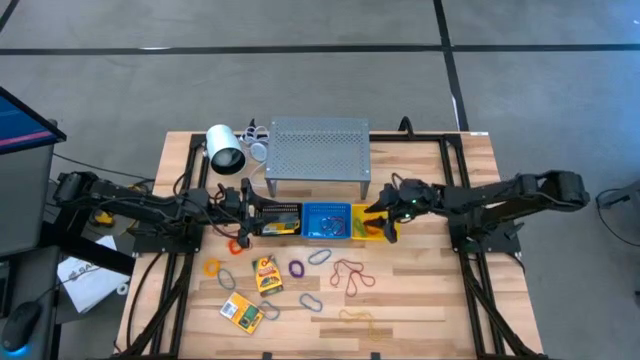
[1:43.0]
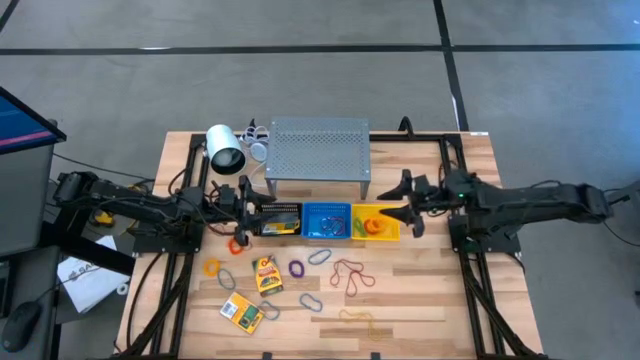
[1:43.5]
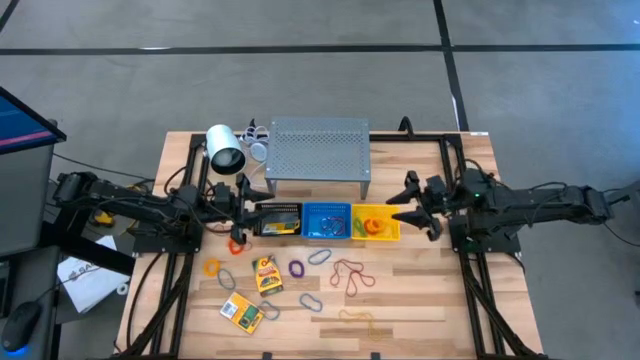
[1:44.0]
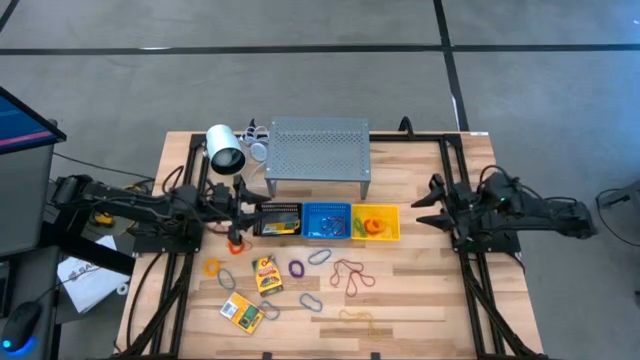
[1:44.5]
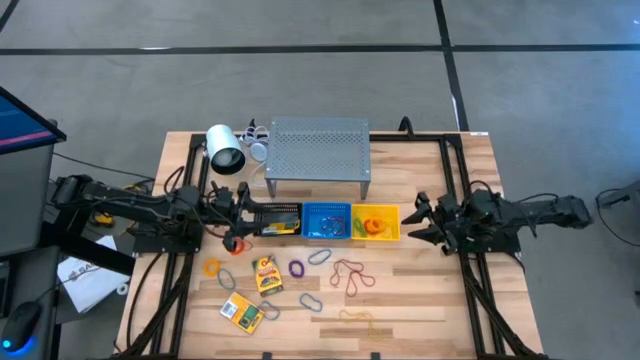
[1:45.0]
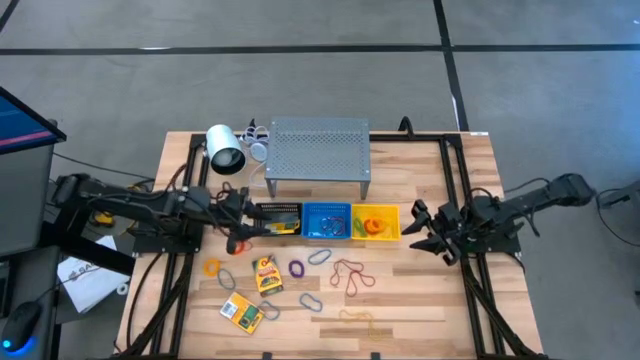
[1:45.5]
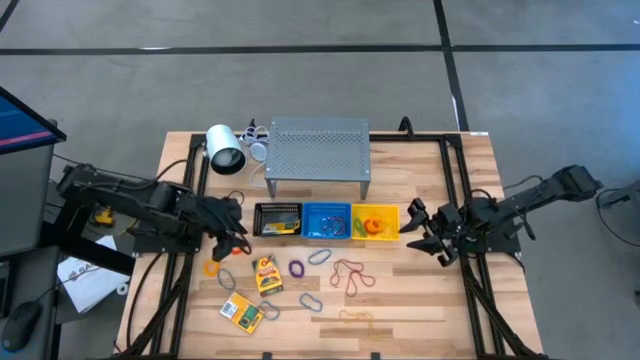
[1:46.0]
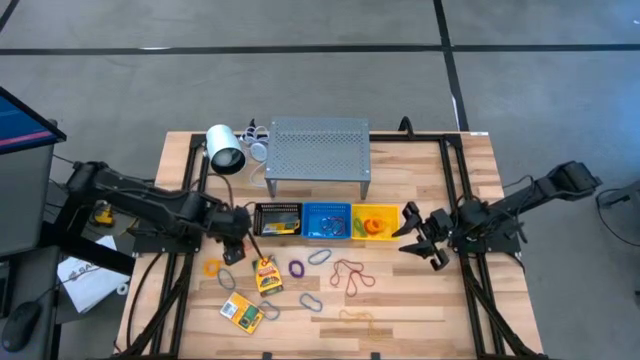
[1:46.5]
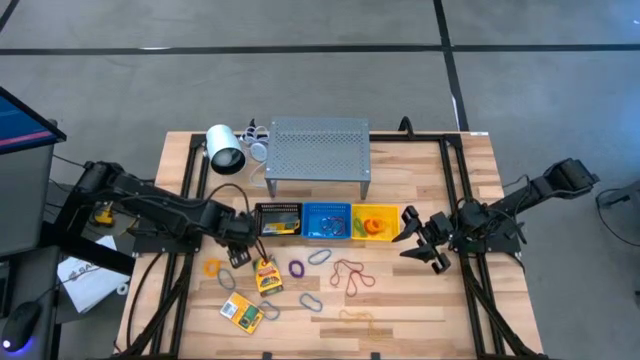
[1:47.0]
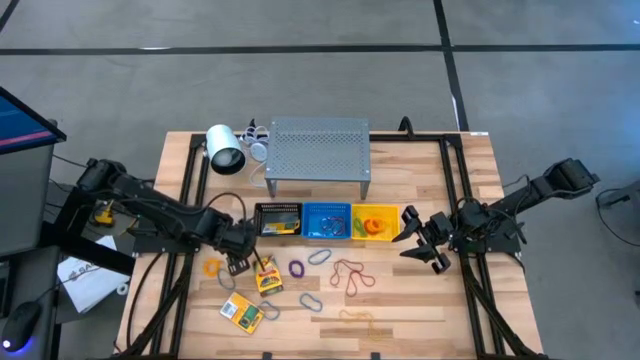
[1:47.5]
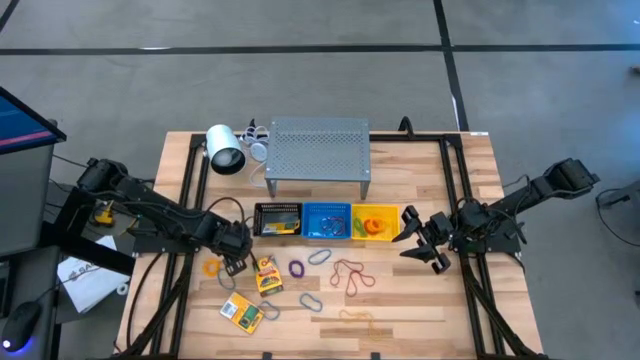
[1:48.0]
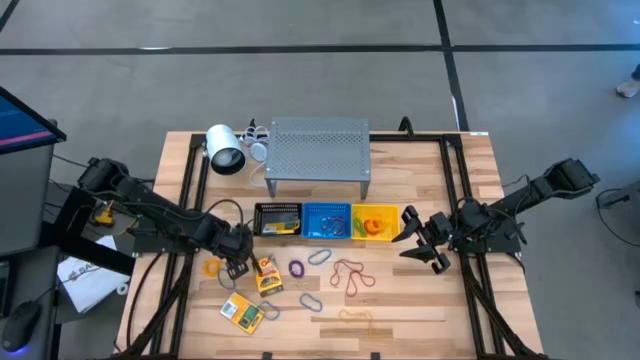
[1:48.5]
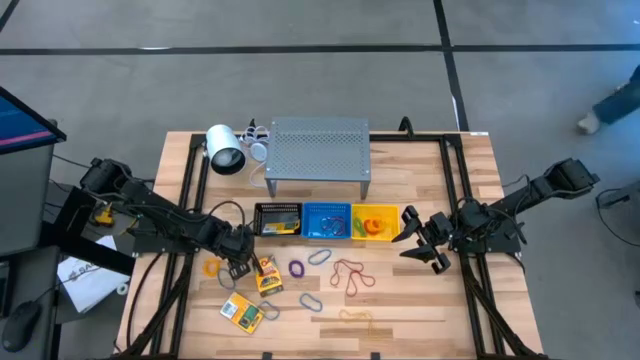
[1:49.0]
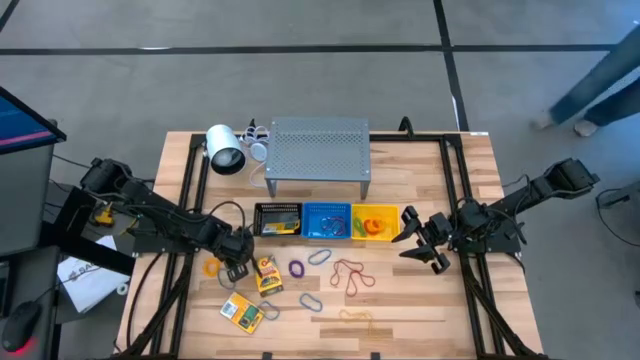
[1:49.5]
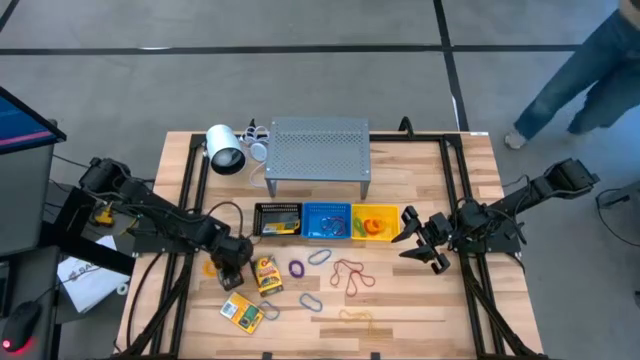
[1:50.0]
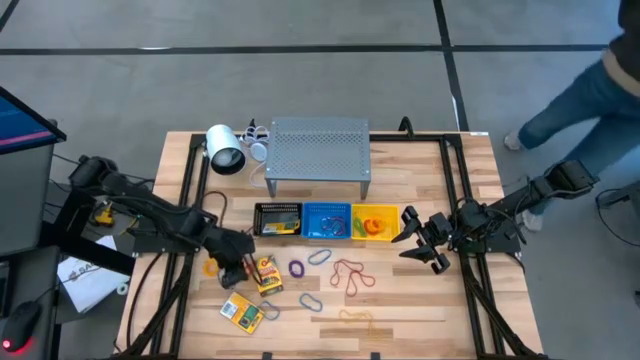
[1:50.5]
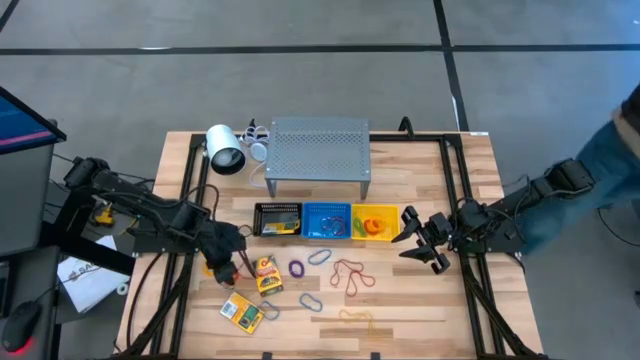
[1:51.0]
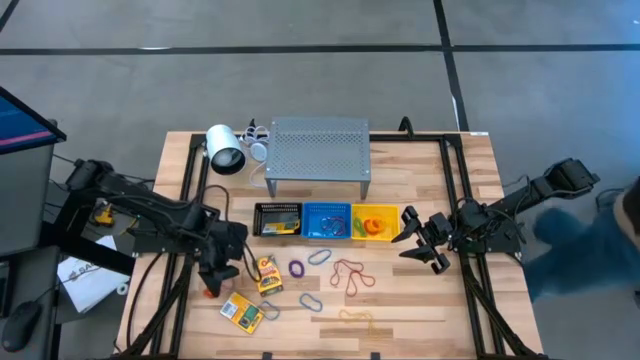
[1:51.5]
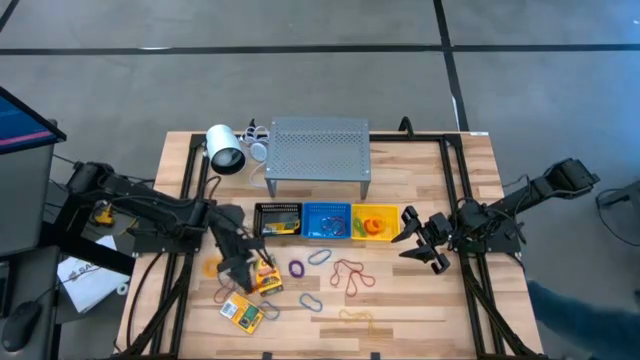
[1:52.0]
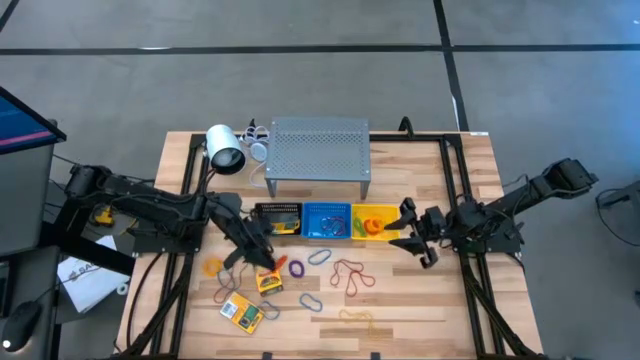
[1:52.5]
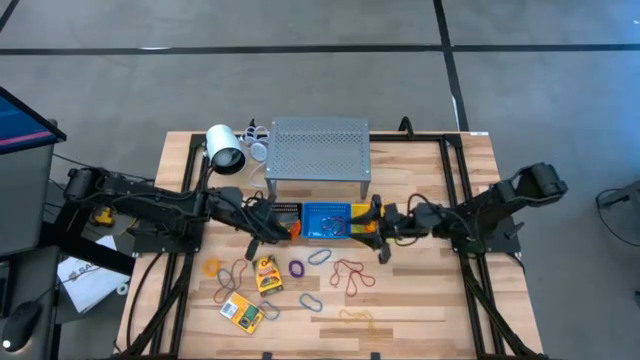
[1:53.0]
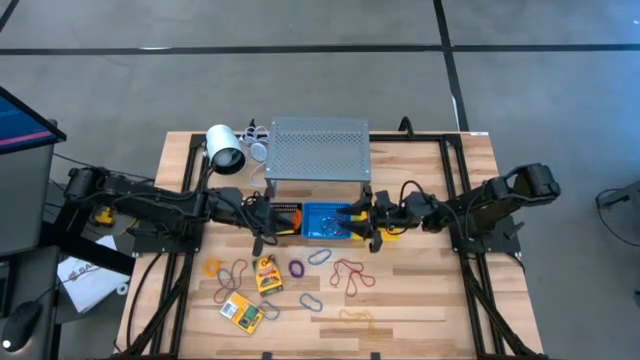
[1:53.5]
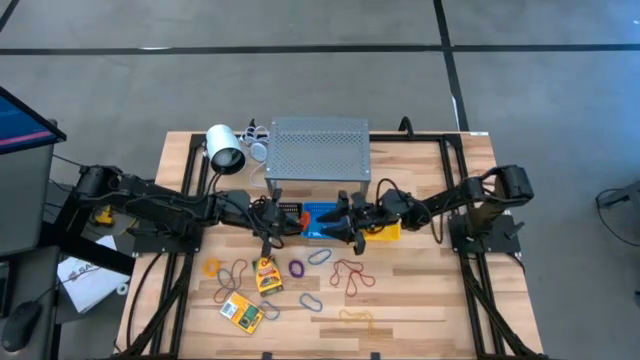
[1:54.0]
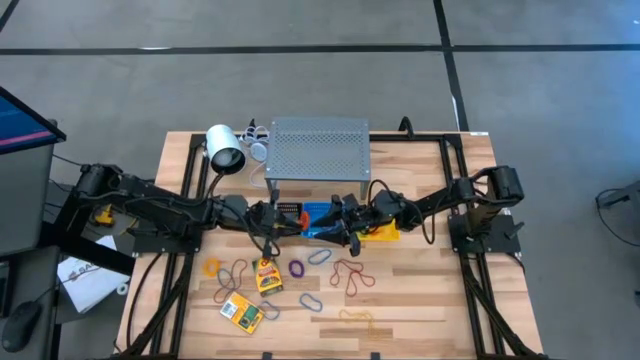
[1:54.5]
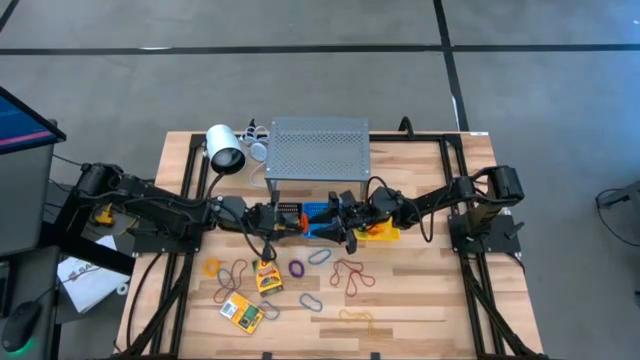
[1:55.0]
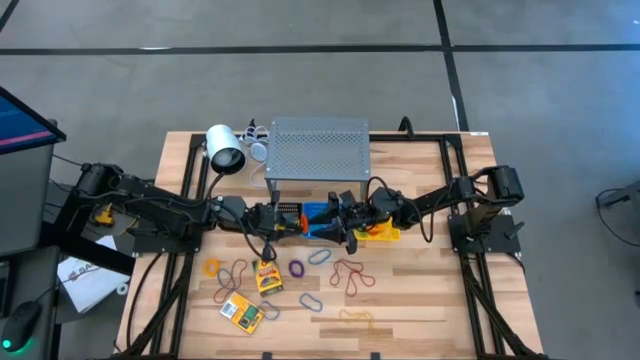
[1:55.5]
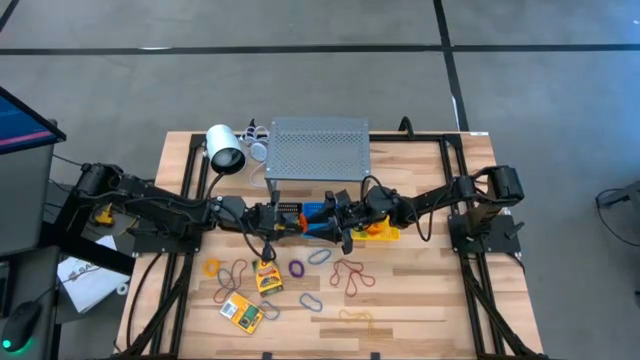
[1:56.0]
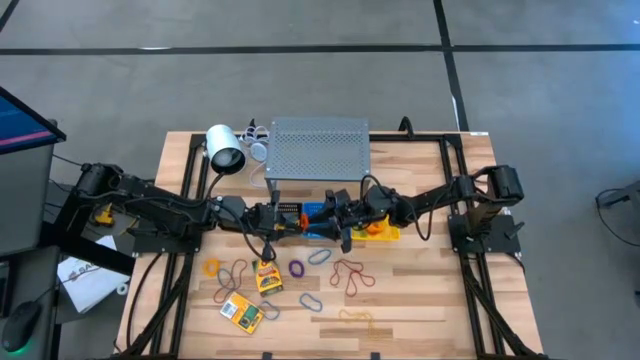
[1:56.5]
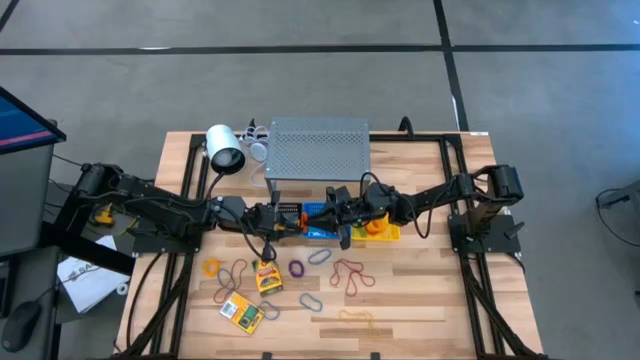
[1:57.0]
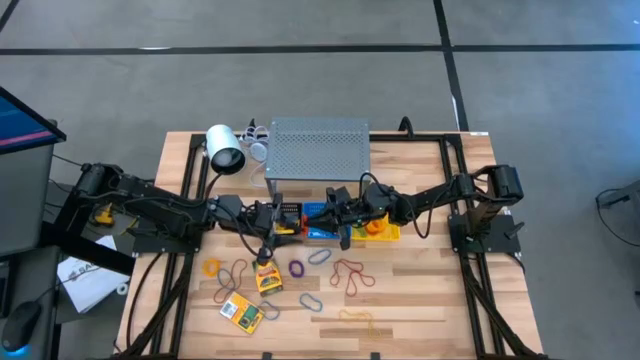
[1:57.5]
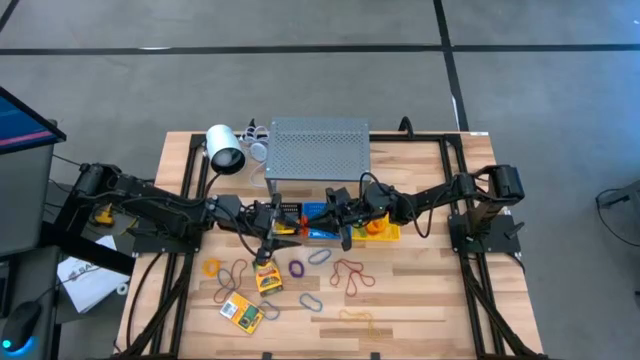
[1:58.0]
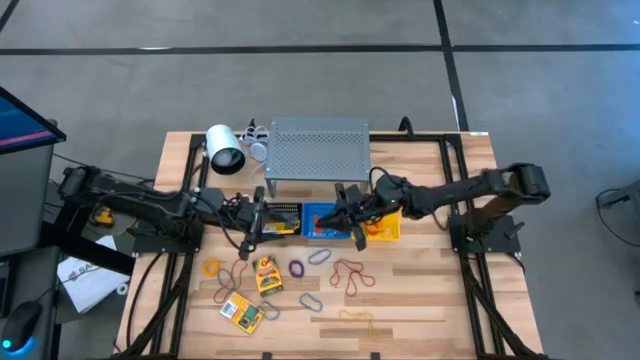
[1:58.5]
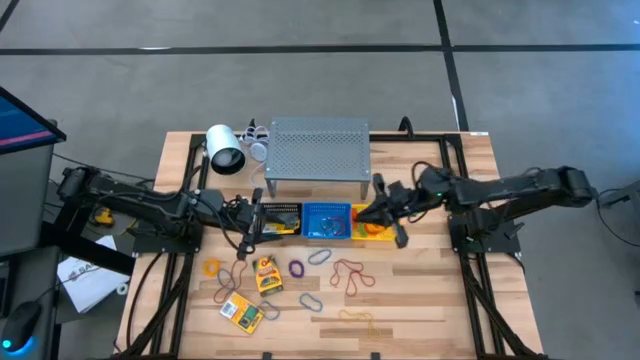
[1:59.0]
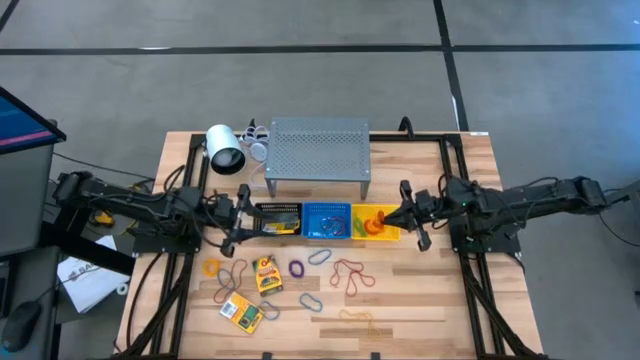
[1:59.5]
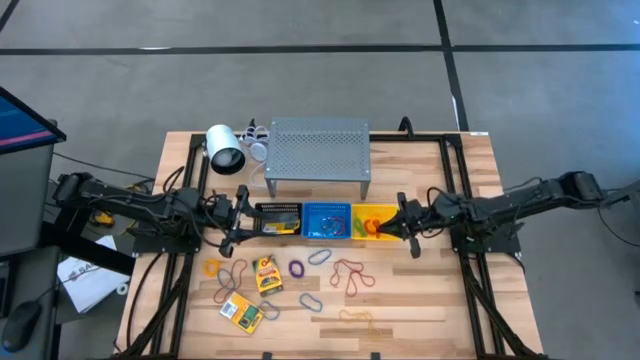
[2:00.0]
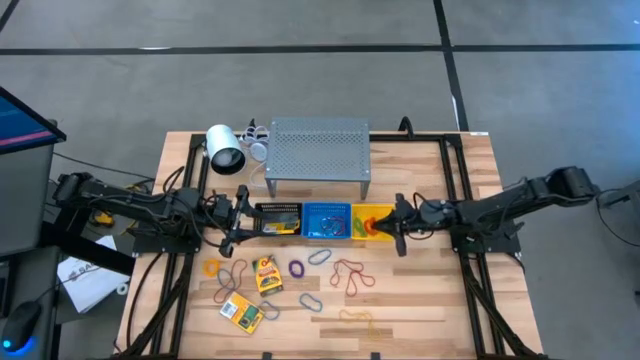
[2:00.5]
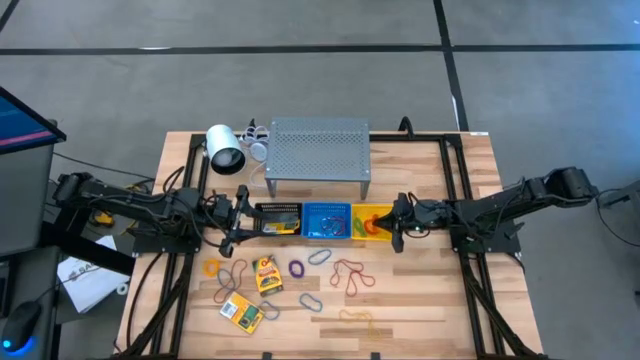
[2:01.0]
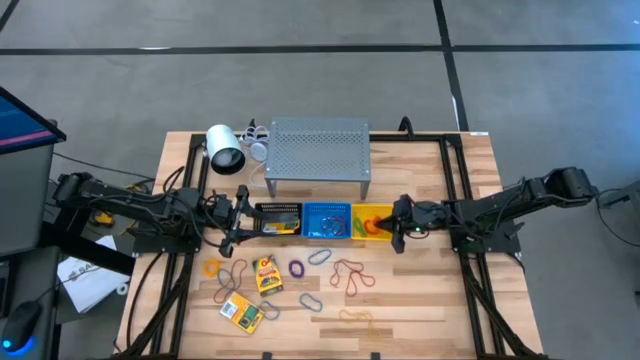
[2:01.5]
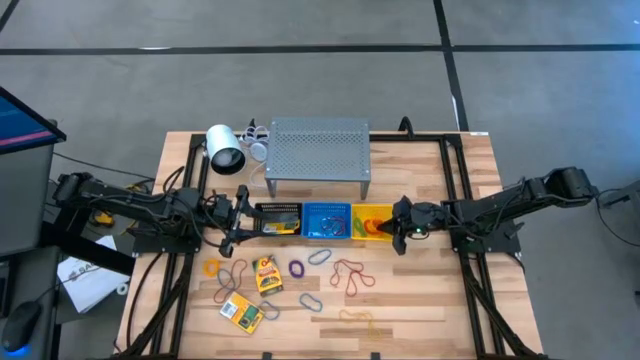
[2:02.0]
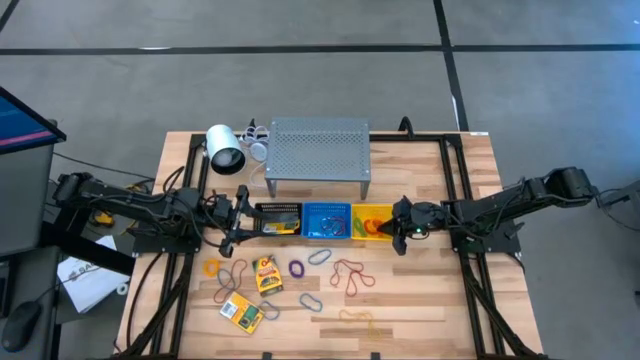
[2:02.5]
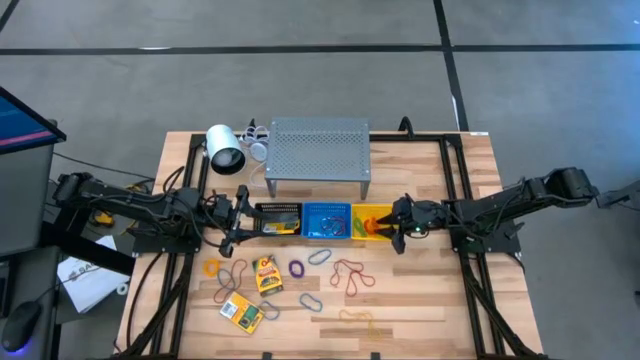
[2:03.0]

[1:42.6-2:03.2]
Task: Pick & Place Office Desk Supplies
Put the orange spiral keychain into the yellow bin

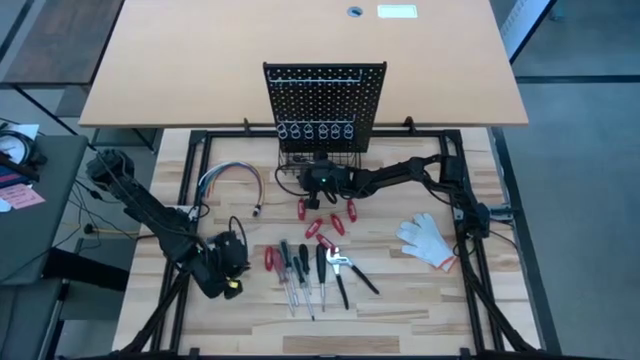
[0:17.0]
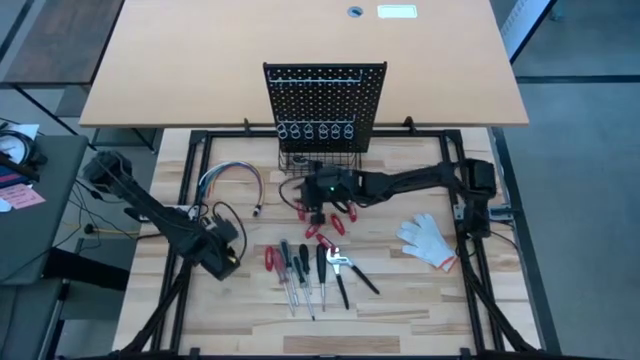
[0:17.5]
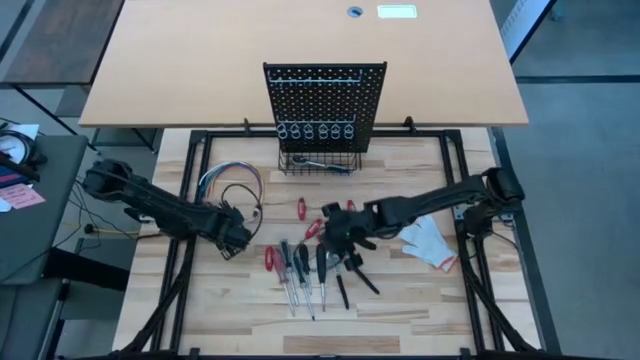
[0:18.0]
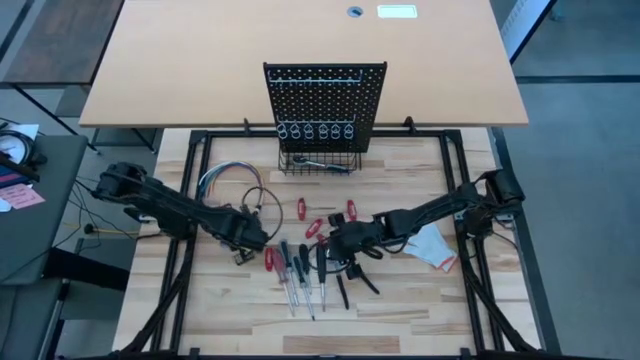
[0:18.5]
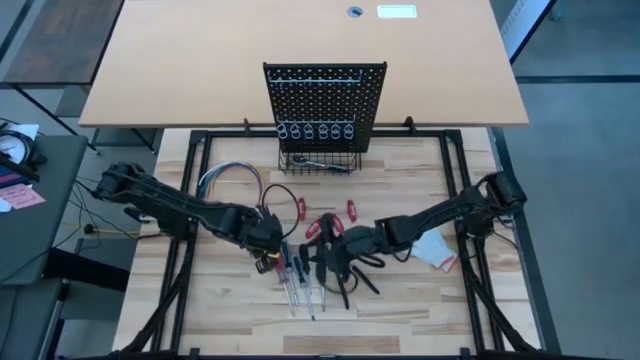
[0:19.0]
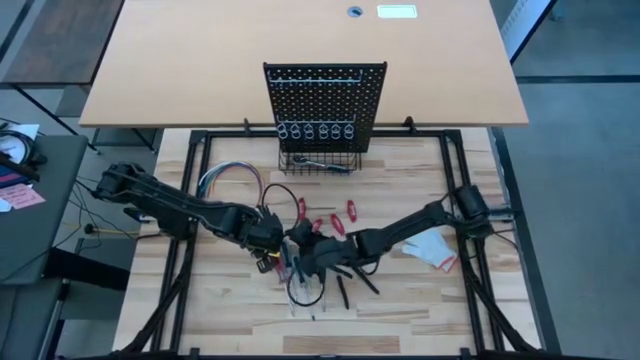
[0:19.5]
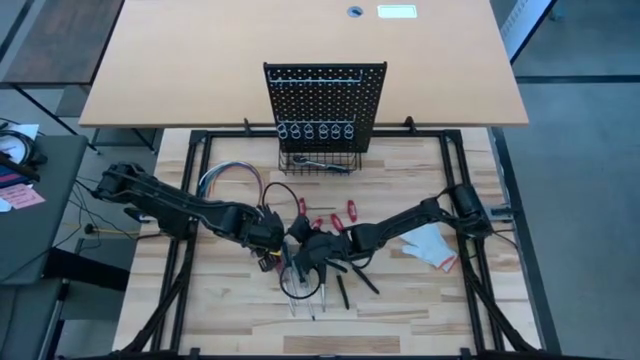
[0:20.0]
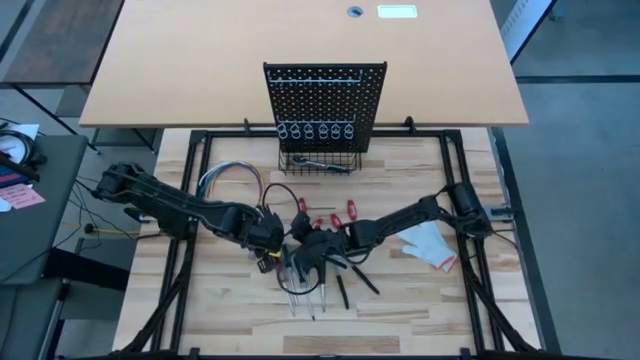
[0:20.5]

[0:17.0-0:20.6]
Task: Hang tools onto peg board
Hang the blue screwdriver on the pegboard
